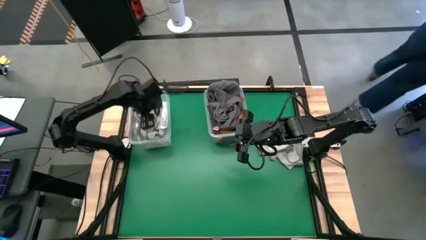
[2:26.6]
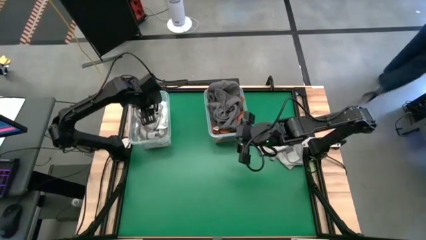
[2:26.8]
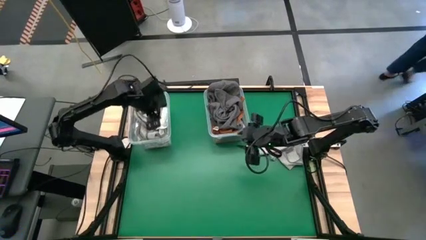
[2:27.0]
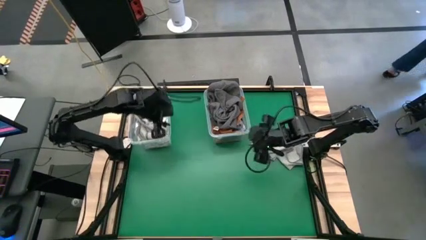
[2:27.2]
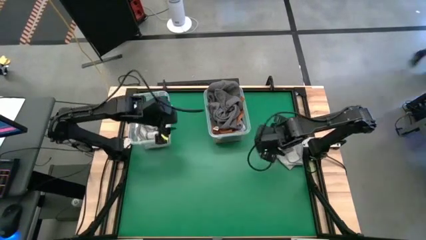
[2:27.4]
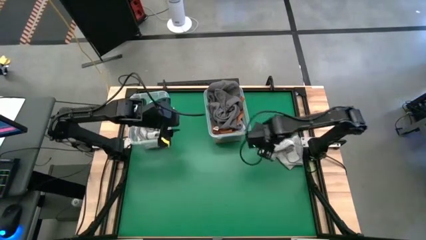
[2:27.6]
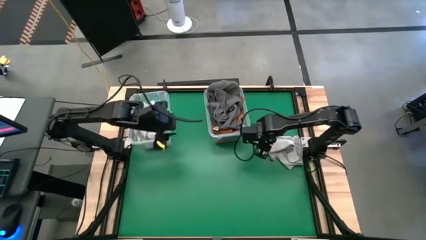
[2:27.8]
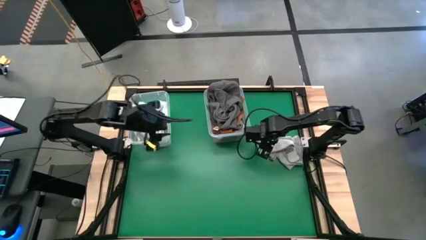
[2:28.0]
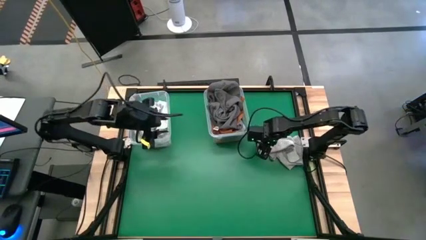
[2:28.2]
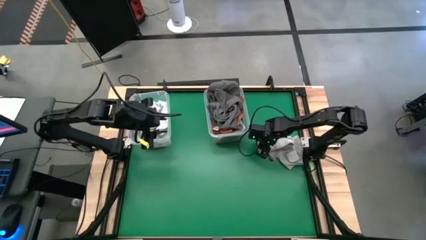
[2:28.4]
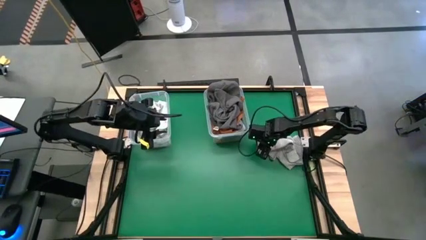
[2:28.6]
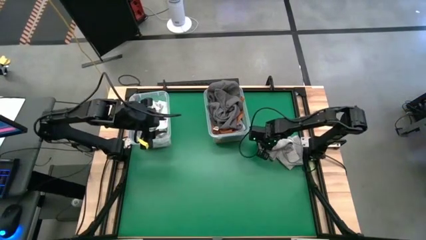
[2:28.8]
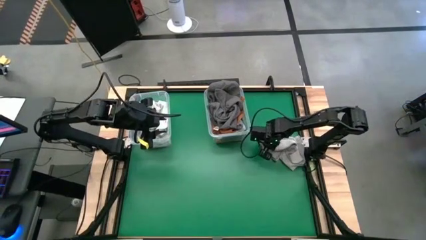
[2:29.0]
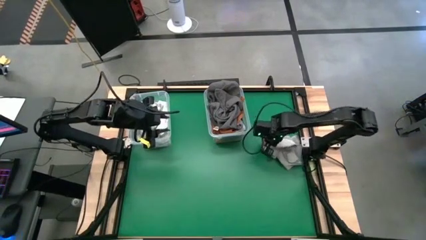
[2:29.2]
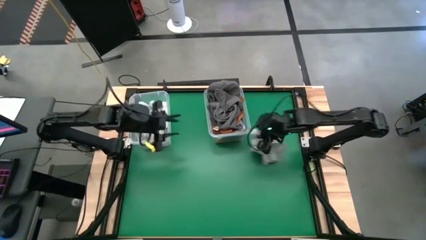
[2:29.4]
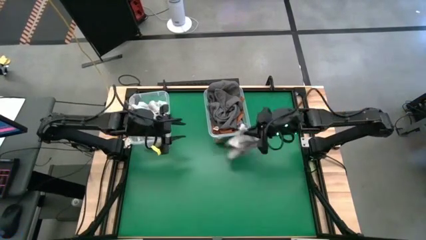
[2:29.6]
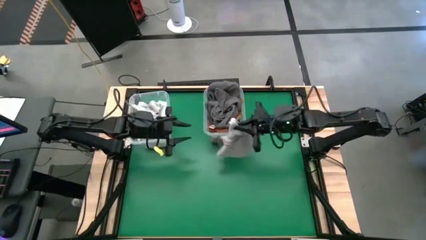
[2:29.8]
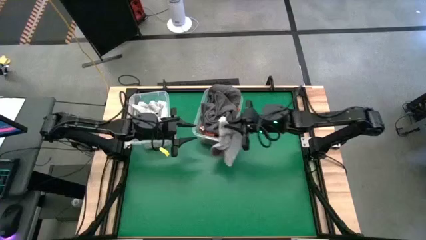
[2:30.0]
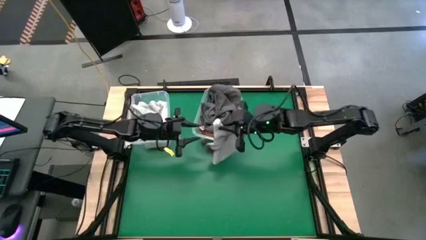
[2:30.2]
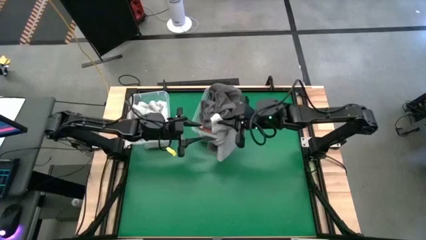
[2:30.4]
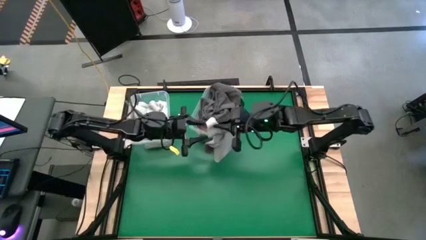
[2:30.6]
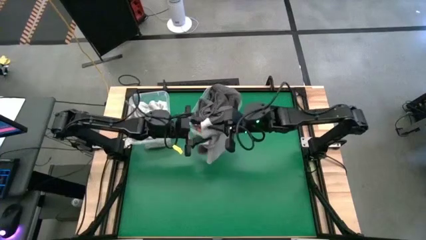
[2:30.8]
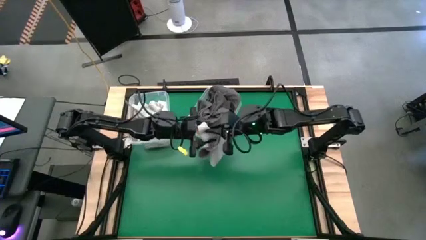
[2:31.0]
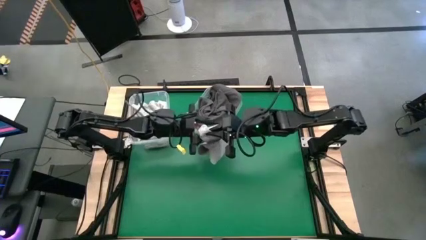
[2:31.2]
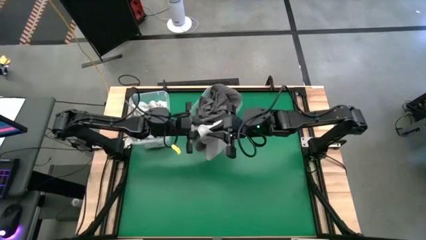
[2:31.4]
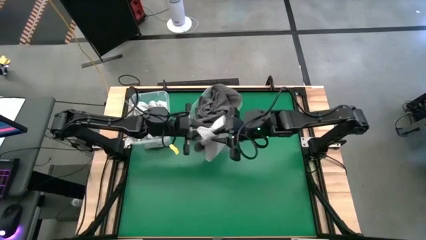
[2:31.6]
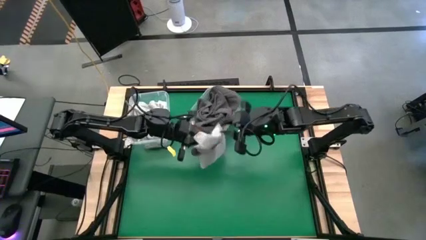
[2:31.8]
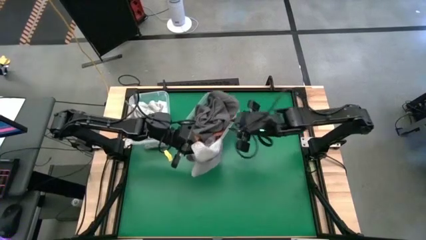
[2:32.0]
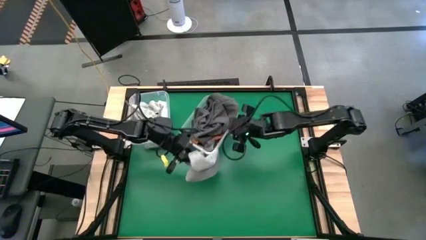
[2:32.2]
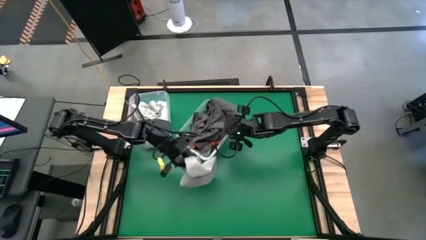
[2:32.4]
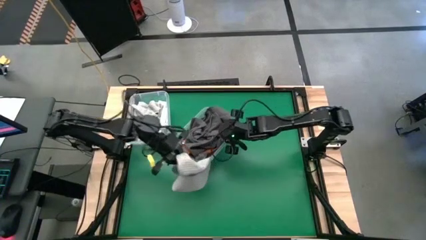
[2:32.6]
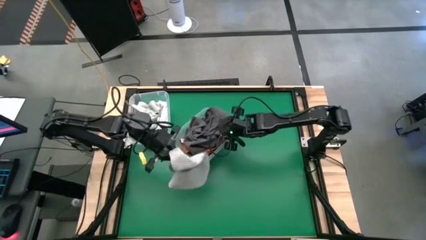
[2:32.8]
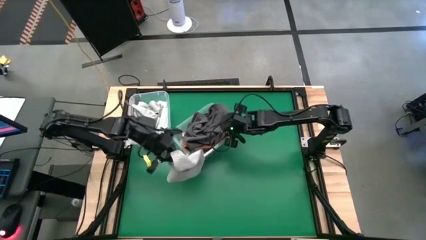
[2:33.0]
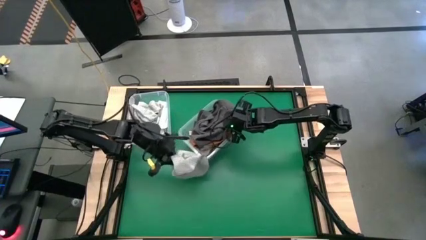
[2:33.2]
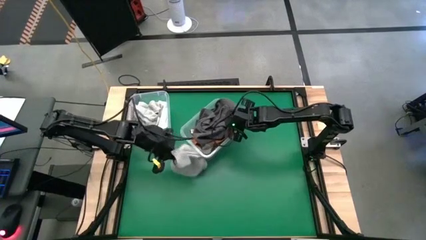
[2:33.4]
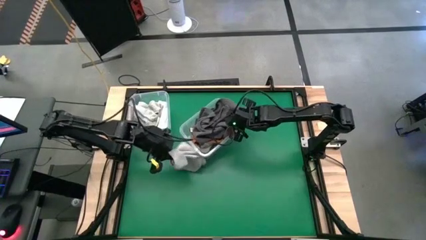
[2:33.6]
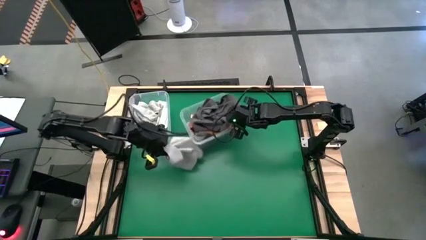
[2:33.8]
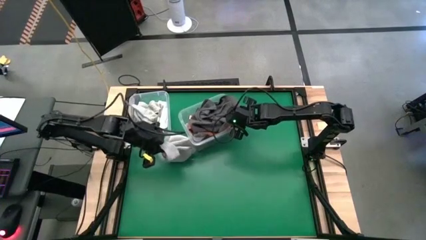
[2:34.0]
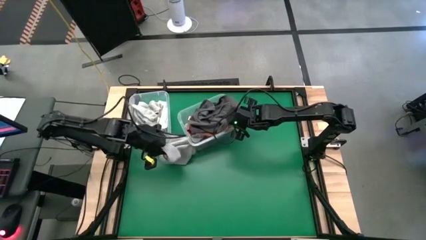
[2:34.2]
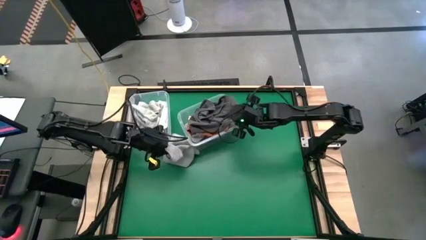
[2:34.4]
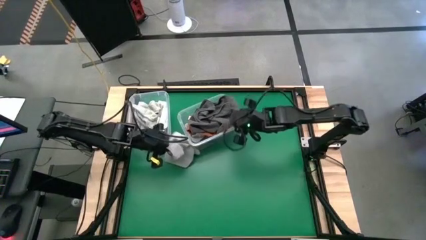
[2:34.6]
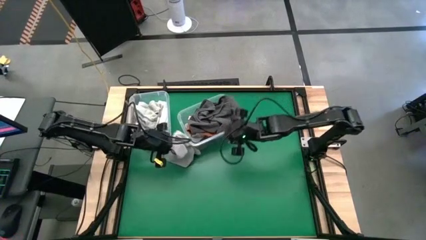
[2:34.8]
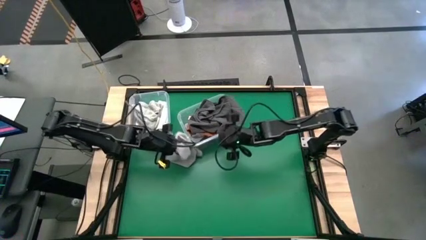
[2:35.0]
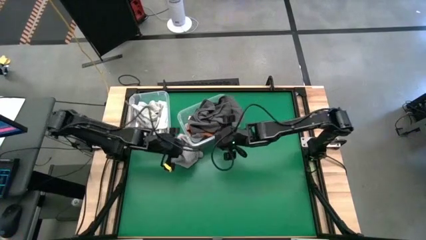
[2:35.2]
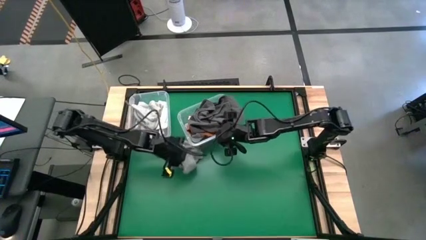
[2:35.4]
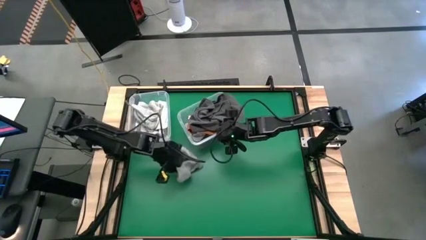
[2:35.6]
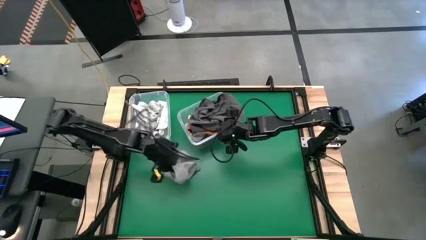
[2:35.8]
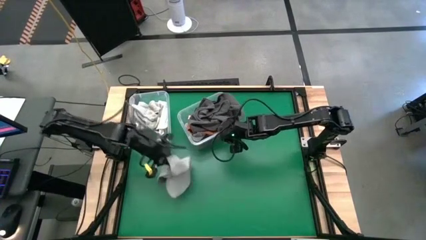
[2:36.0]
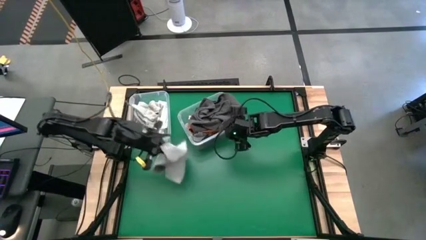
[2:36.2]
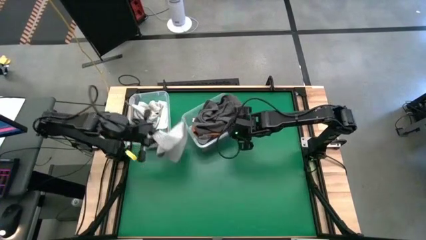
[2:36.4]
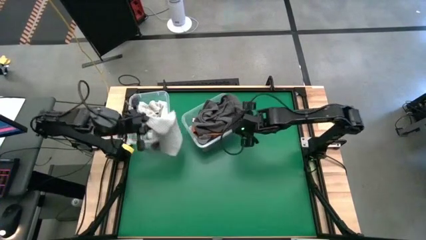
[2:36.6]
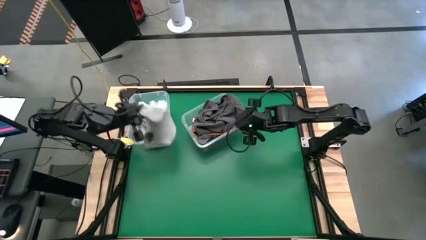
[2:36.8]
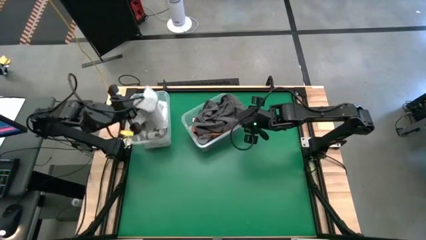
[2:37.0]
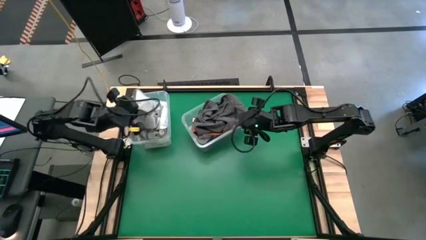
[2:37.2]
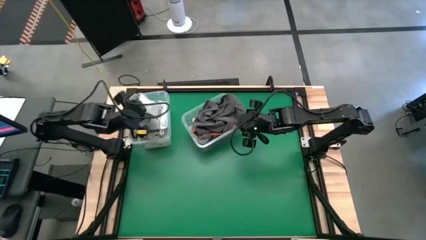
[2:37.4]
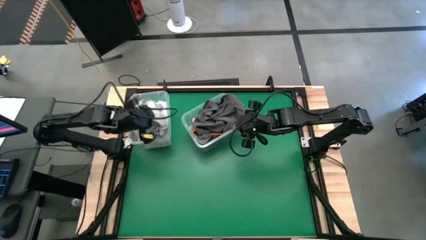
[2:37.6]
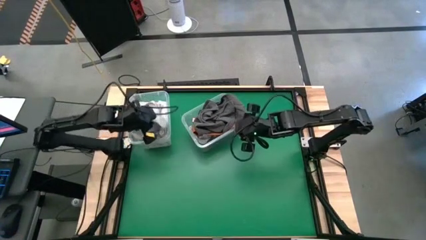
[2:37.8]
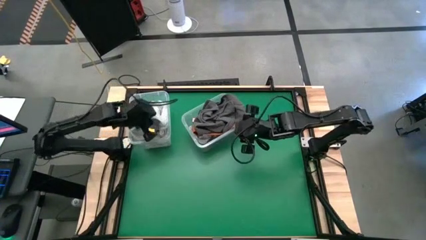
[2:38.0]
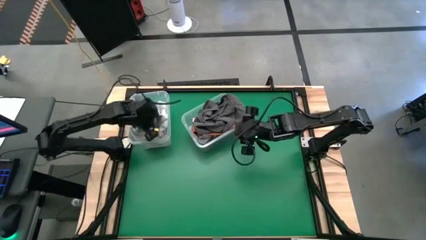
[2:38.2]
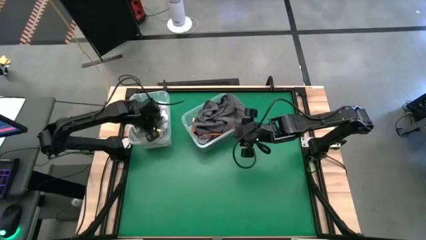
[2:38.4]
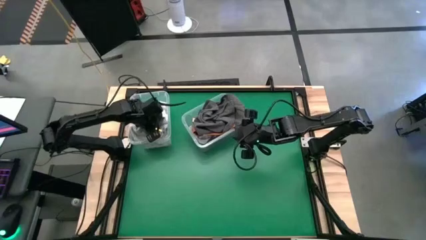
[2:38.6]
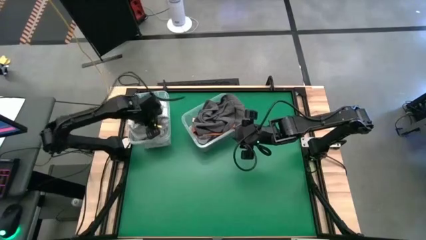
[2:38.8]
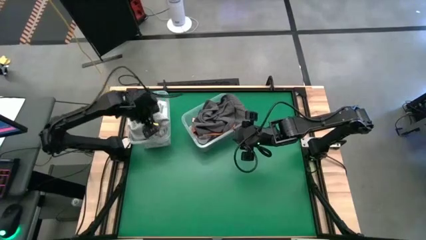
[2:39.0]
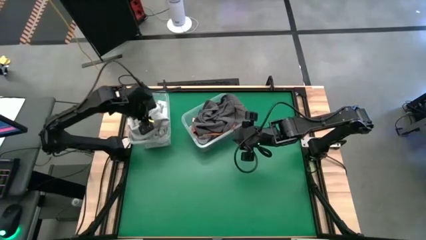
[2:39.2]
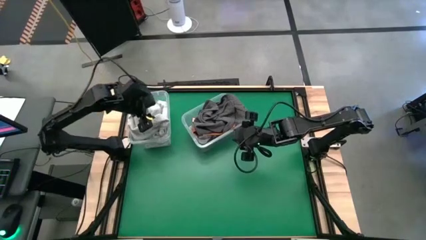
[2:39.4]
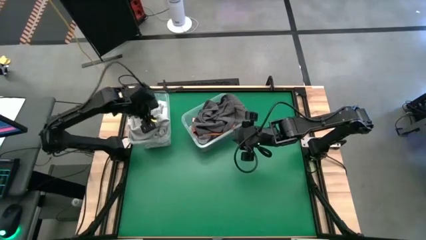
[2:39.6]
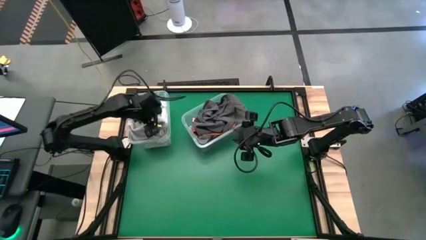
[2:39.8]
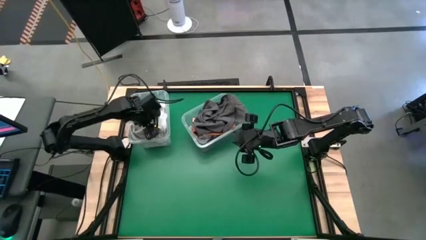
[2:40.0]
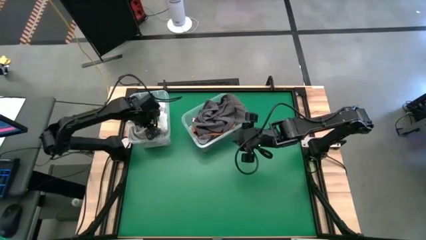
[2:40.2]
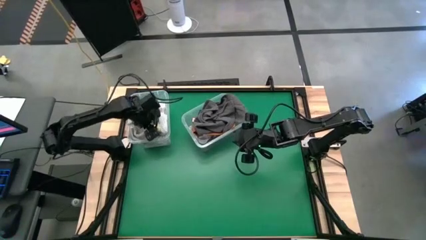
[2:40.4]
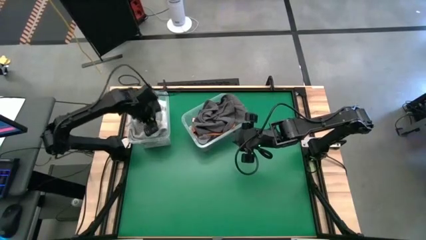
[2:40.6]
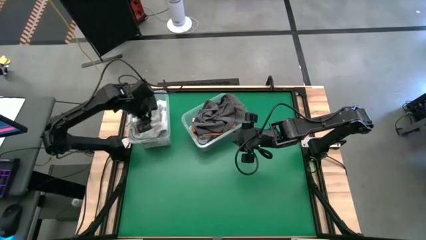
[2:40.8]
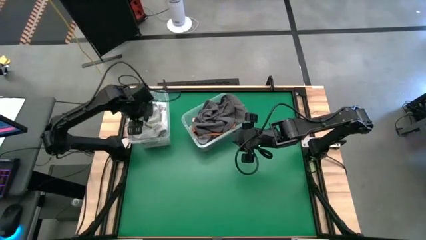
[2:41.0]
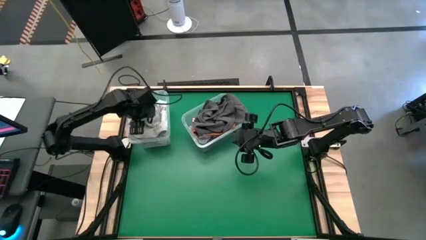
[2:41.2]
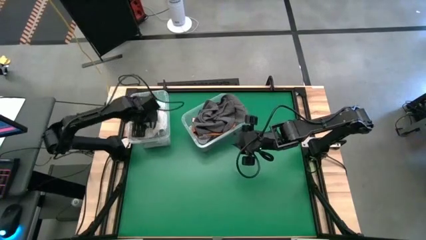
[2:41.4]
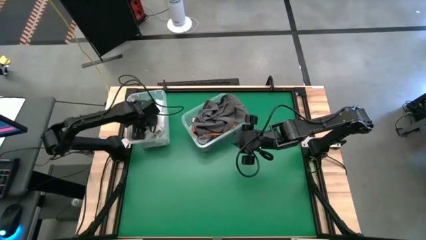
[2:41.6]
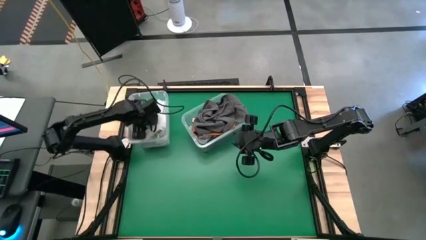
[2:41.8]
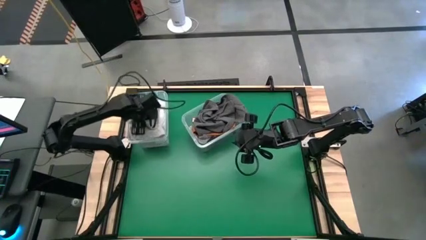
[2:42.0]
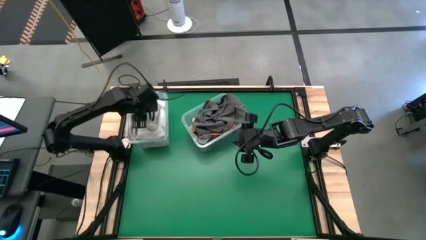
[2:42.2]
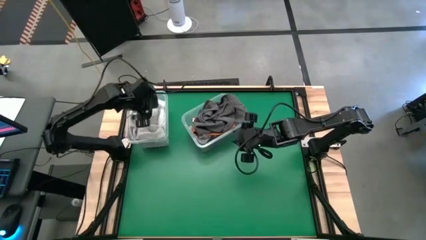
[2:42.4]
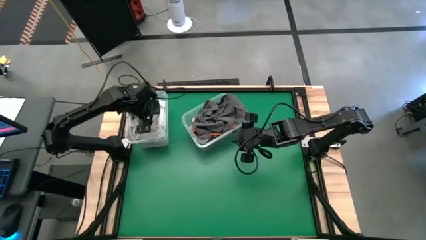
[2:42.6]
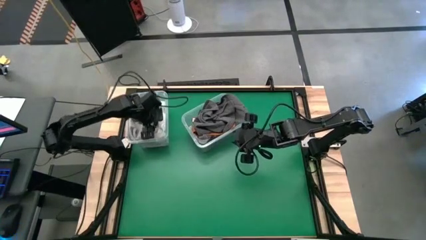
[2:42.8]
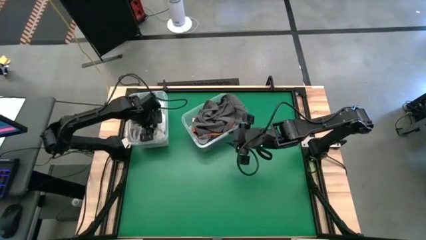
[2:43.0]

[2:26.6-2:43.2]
Task: Sort towels by color in basket
Put the light gray towel into the left transparent bin
